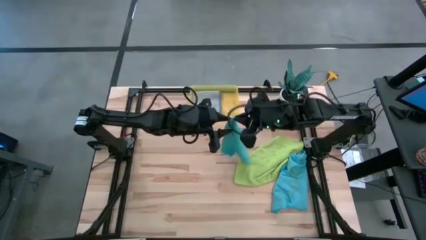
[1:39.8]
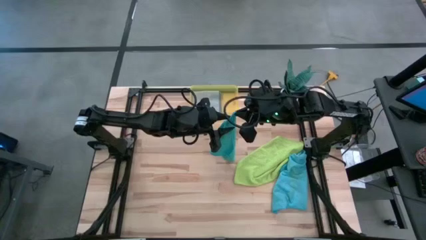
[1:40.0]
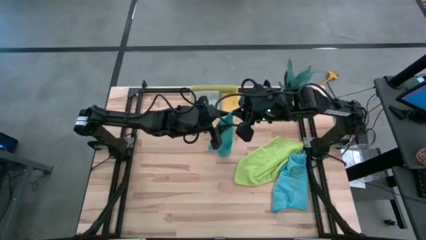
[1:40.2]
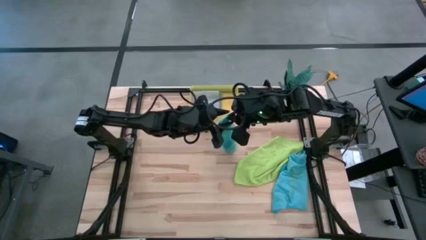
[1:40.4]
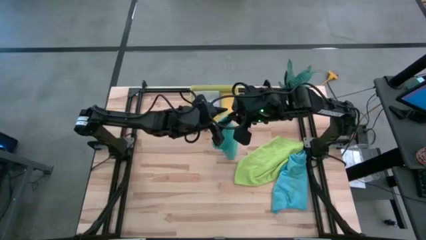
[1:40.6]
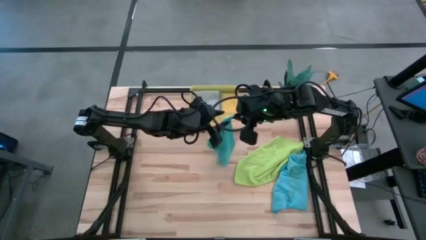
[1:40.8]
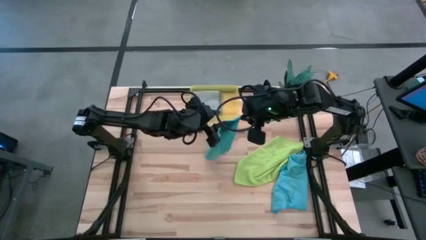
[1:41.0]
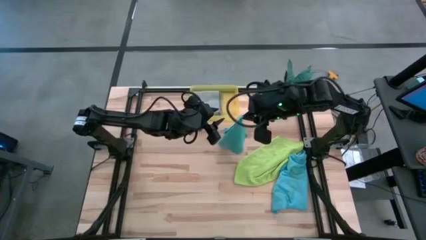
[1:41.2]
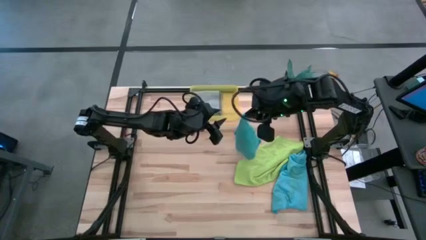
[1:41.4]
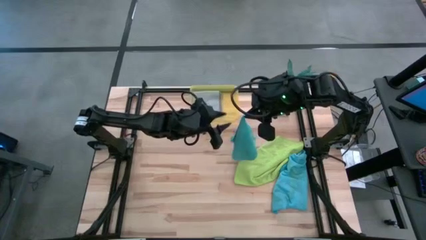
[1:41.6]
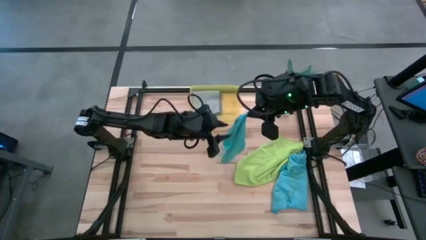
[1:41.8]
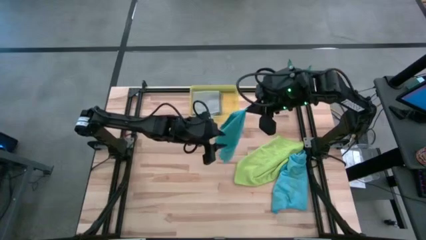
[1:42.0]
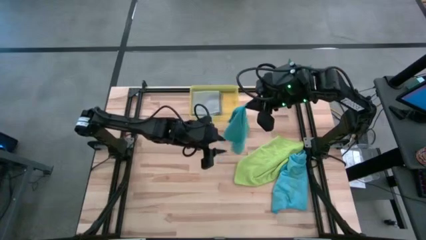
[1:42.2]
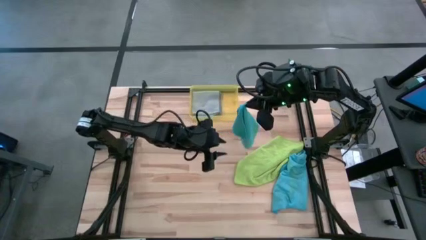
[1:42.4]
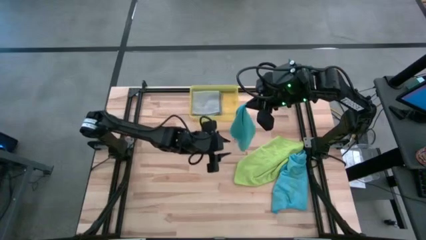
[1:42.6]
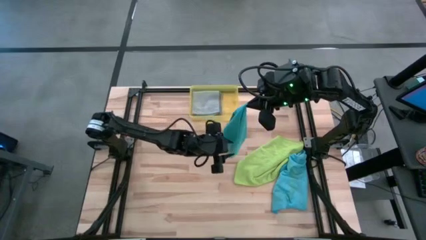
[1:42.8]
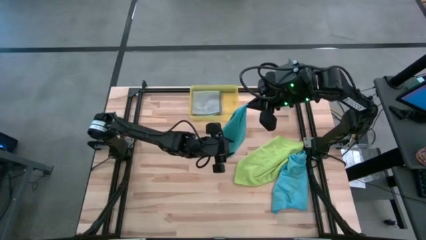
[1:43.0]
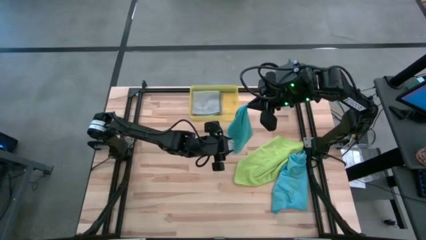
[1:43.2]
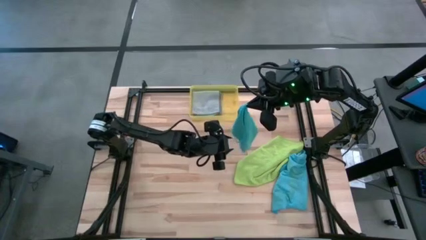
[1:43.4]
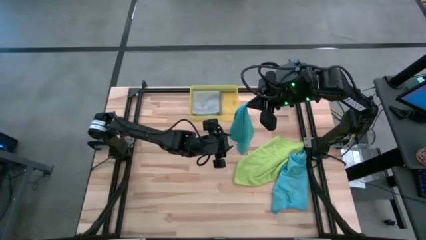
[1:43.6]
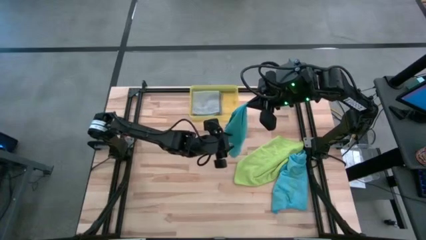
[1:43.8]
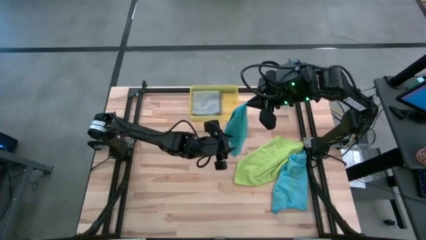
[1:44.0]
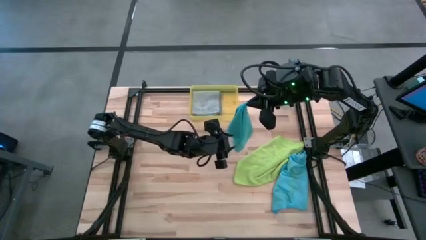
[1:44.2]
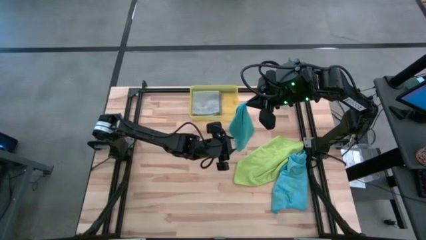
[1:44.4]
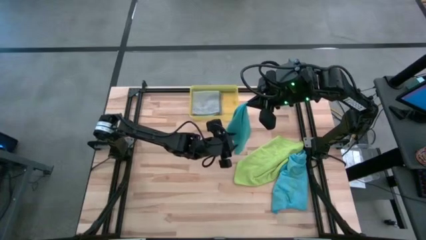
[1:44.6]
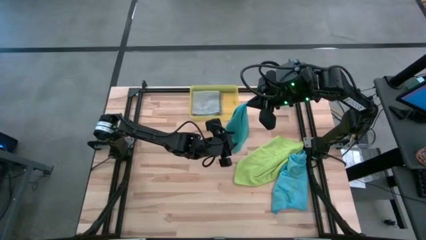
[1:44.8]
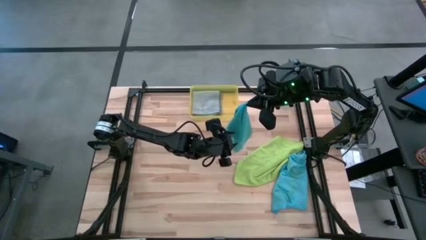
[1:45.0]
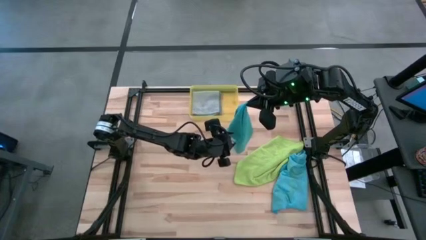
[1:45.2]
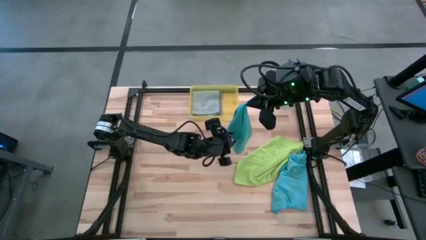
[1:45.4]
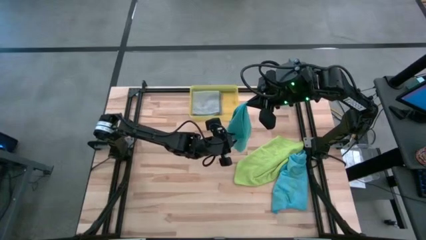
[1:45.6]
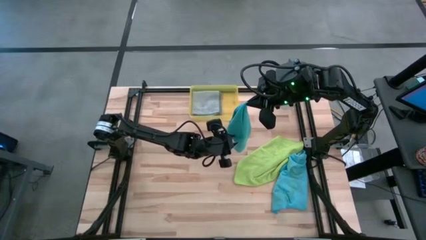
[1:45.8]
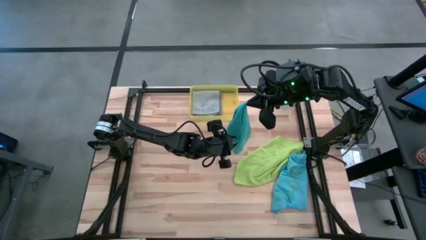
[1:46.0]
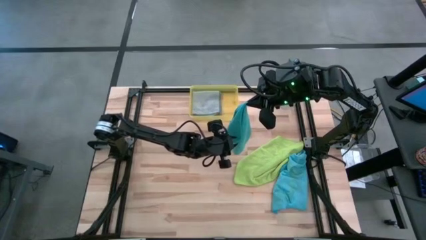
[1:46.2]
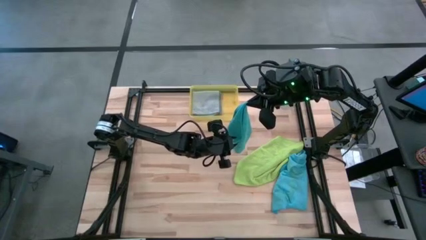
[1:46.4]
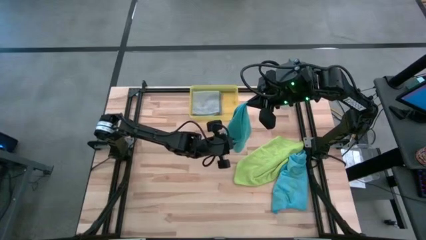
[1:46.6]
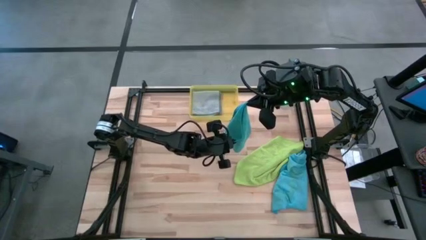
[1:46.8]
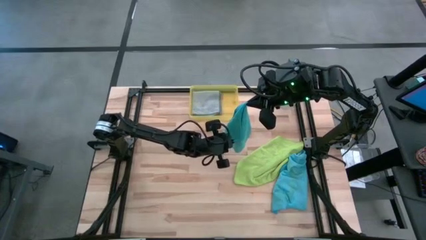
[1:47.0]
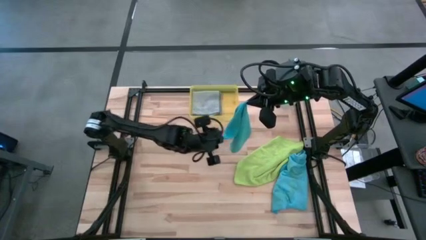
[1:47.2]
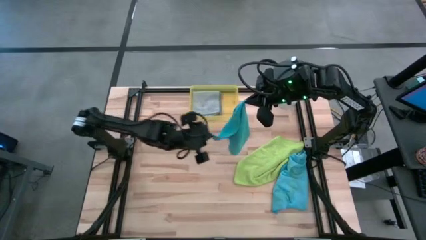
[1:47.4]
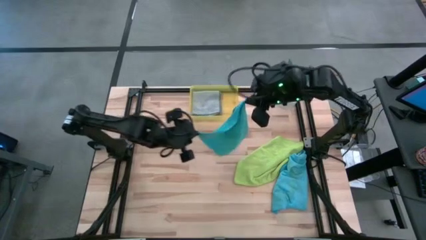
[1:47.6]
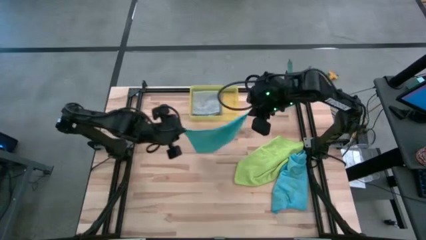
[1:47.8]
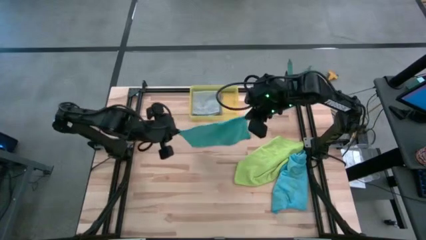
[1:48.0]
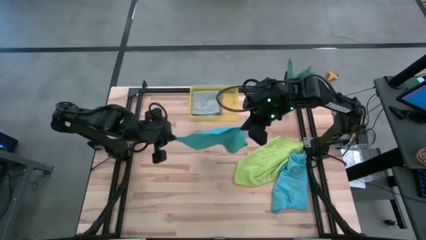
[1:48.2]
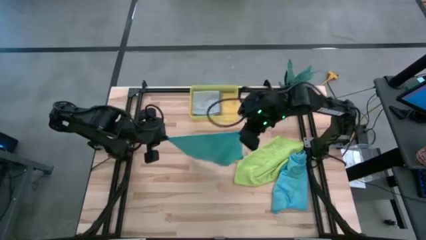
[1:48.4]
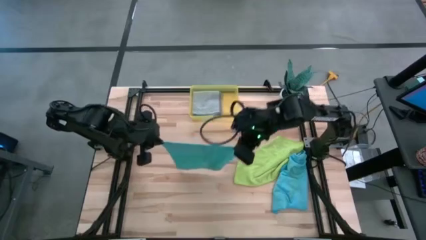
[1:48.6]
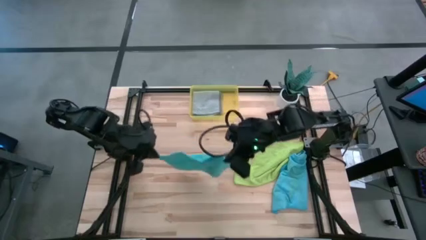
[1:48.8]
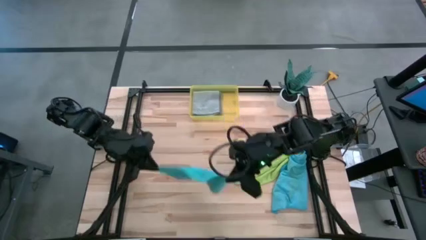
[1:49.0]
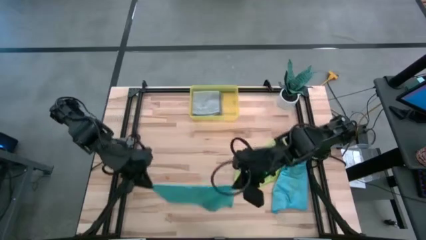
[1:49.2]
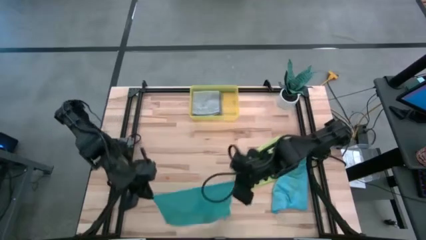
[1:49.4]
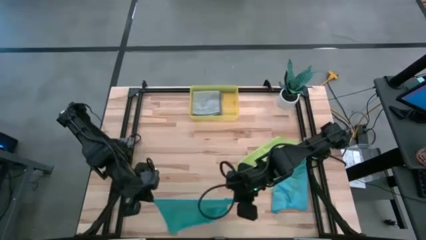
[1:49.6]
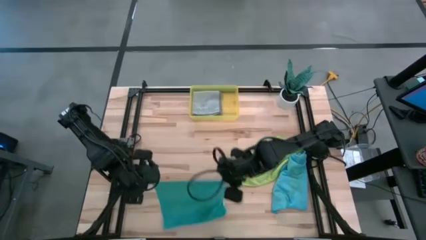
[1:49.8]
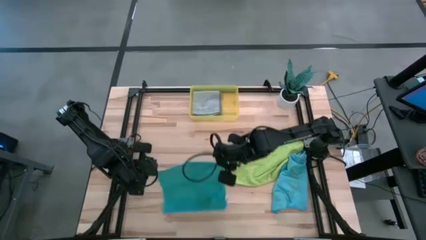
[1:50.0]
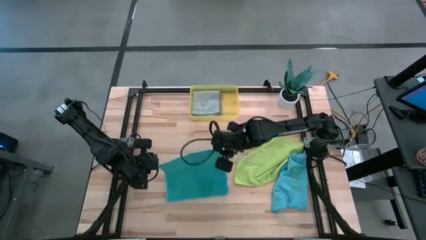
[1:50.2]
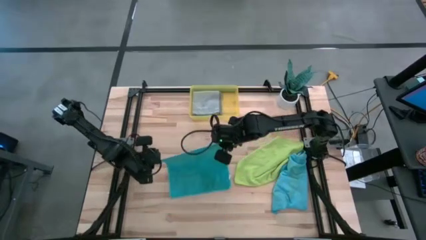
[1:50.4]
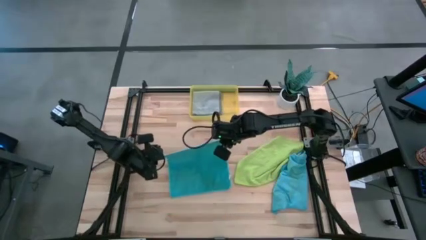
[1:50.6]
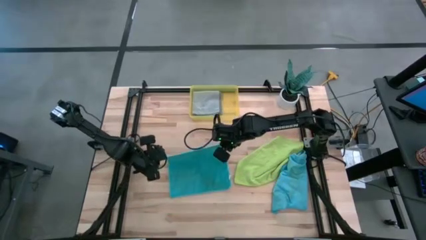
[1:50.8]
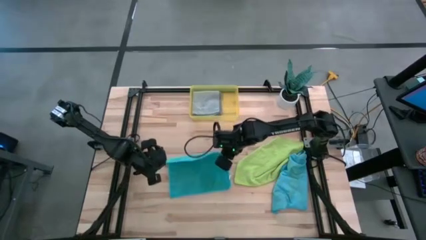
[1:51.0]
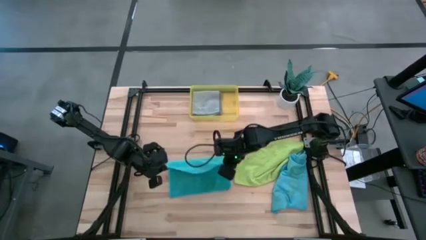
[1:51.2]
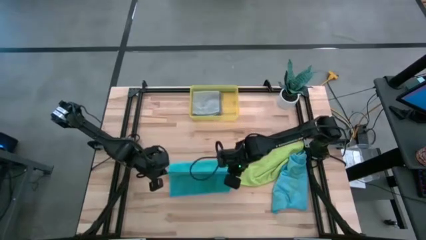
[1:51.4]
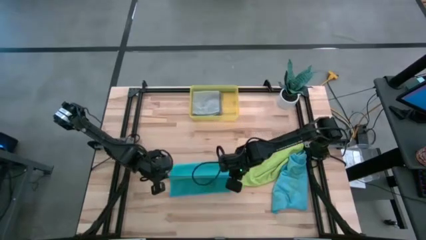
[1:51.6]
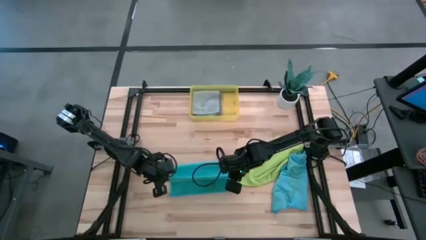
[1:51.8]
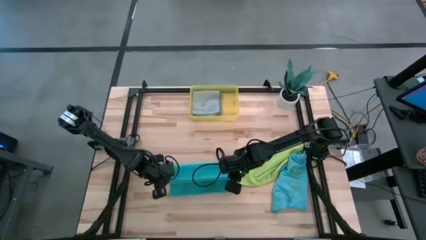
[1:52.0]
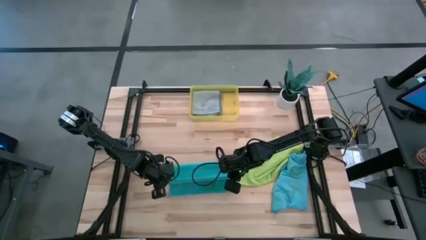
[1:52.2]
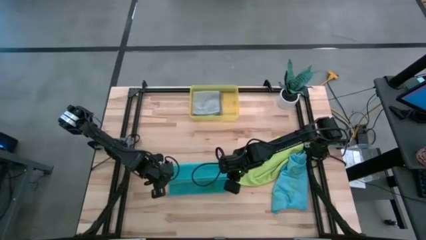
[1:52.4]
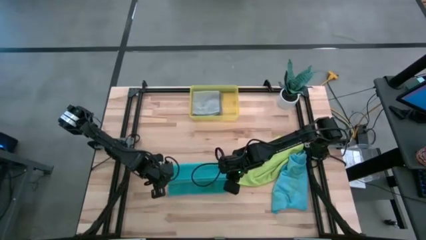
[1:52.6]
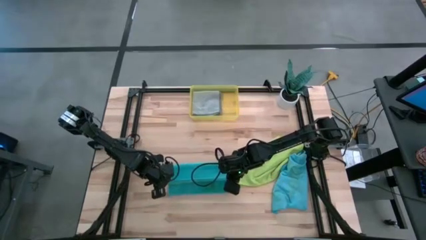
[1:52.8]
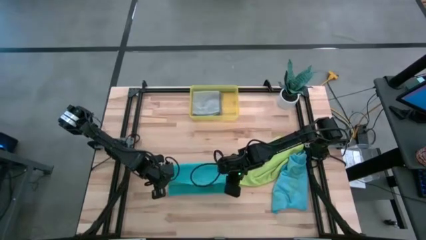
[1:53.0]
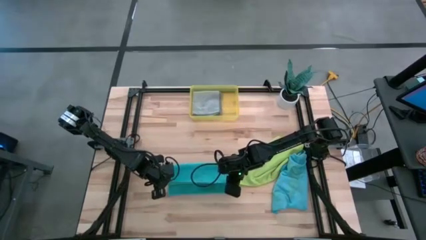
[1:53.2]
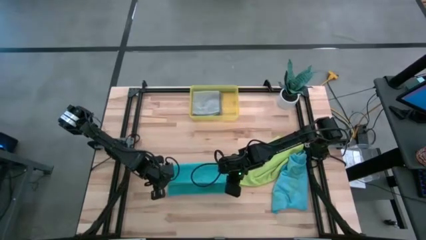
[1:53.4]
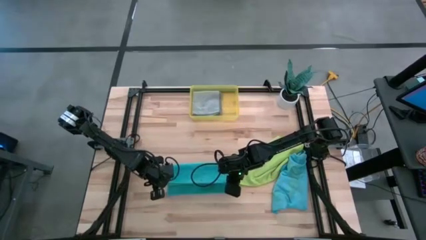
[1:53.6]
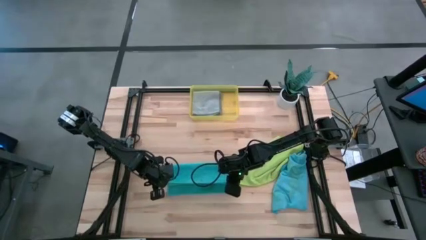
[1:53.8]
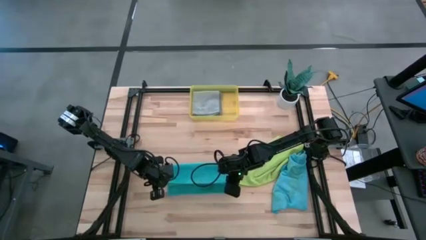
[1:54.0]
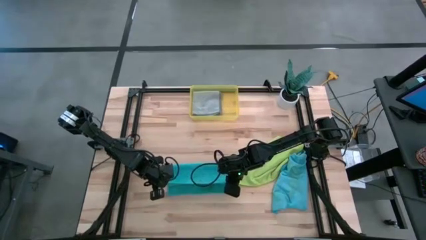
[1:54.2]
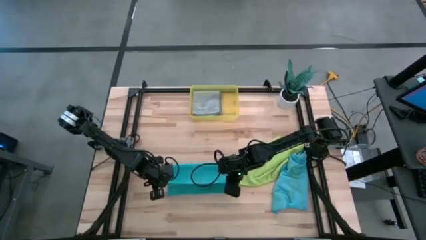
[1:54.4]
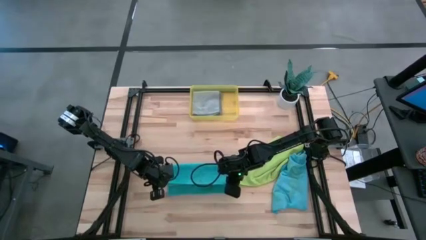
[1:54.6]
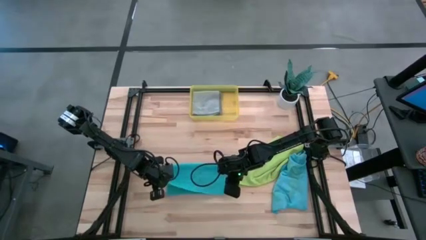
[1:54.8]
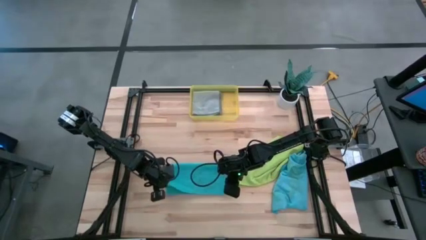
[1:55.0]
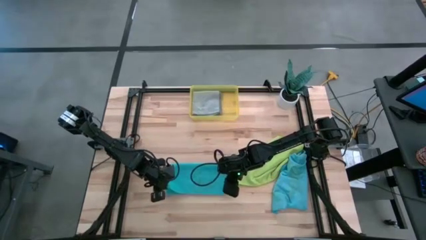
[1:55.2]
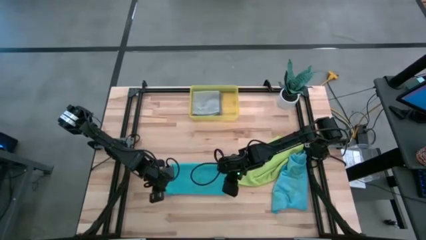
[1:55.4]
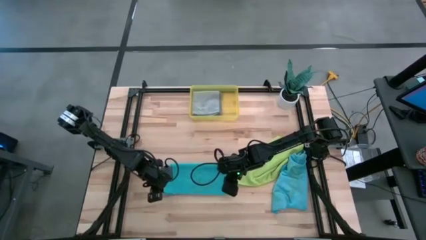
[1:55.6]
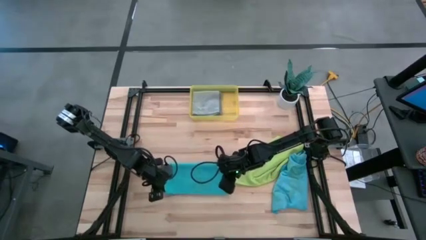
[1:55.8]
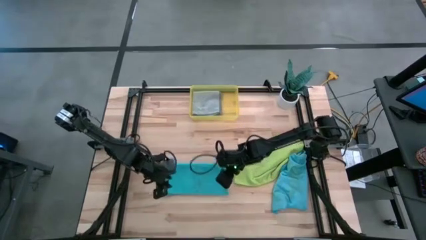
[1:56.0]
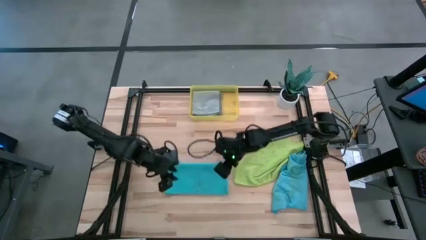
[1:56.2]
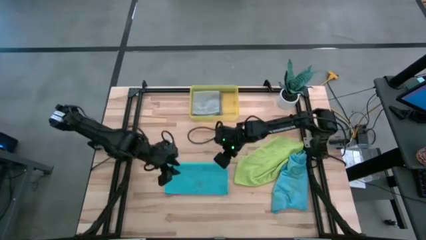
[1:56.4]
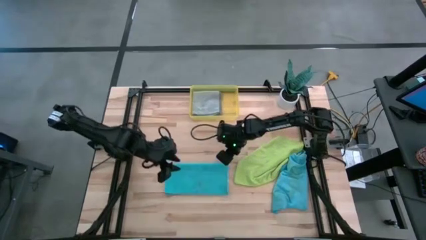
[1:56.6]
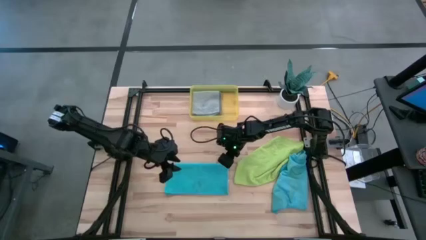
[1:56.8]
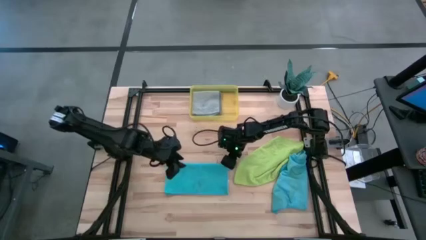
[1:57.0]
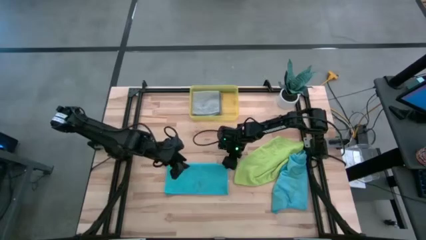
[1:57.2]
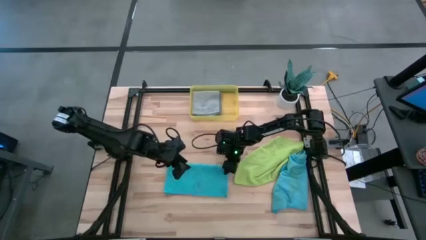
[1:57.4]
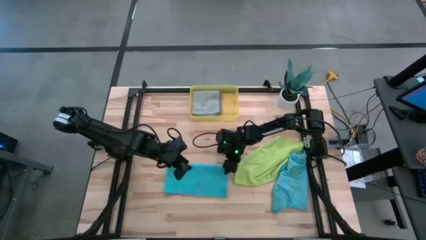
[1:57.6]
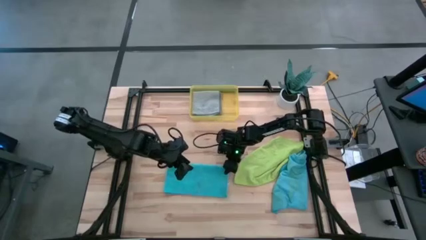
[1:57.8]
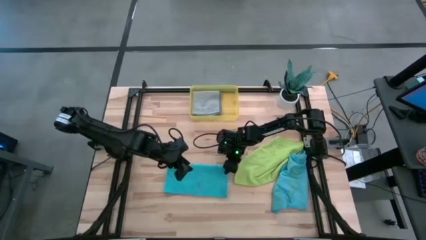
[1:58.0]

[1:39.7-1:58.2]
Task: Fold microfiber towels
Fold the blue microfiber cloth
